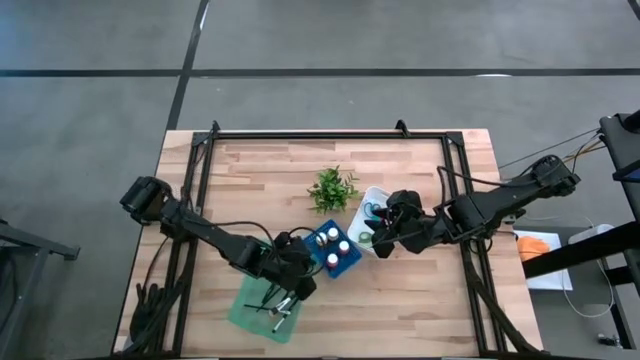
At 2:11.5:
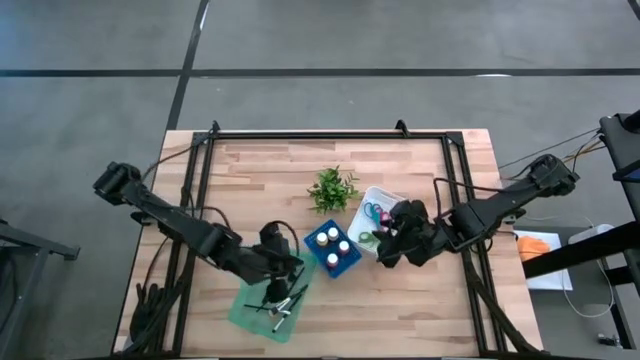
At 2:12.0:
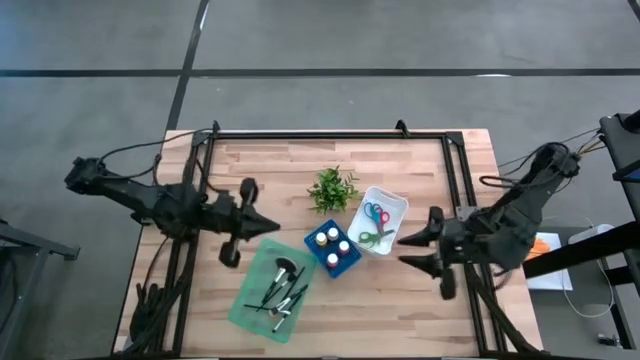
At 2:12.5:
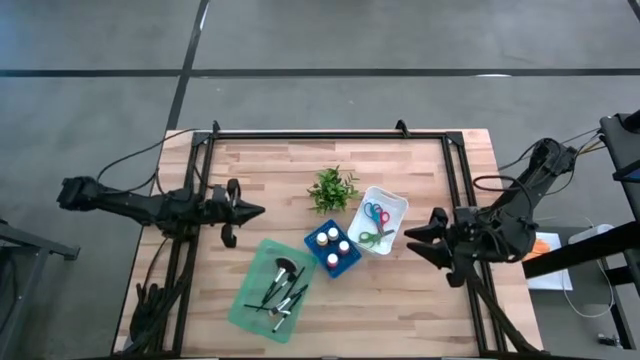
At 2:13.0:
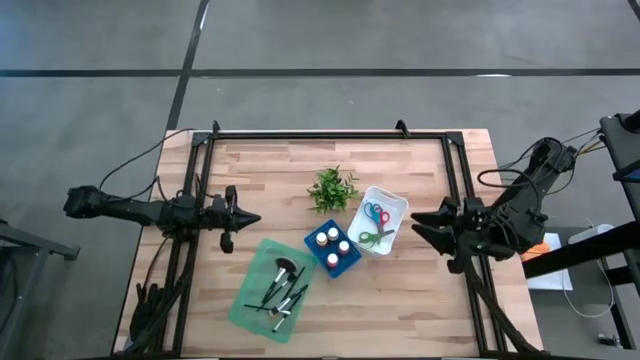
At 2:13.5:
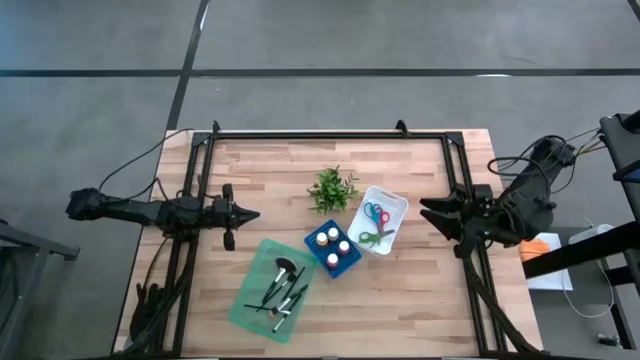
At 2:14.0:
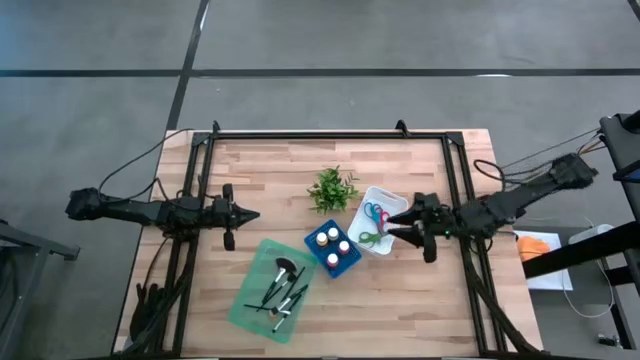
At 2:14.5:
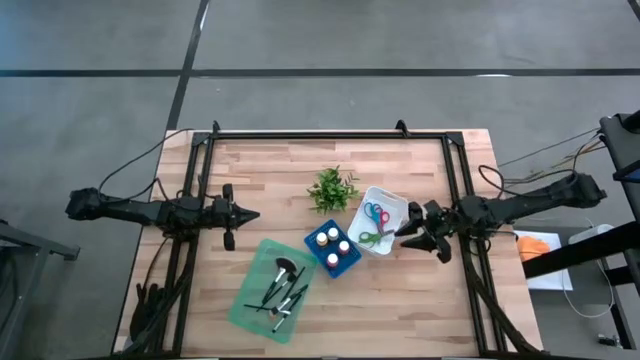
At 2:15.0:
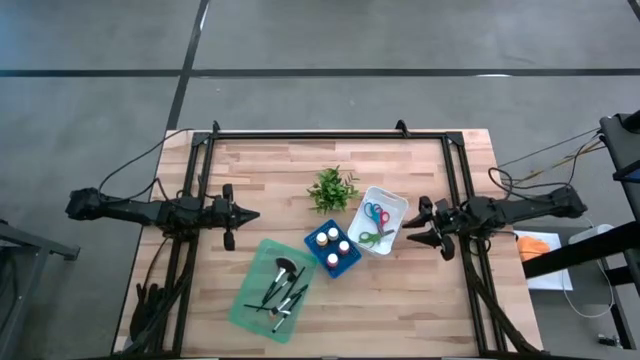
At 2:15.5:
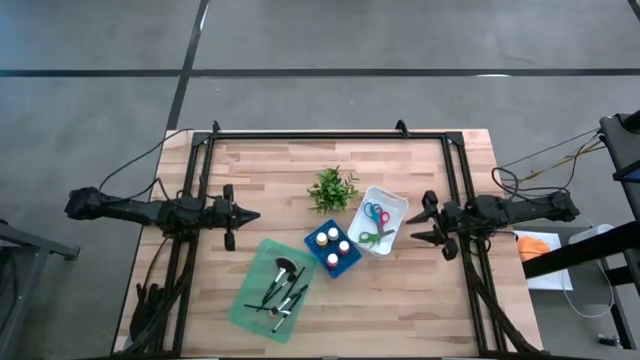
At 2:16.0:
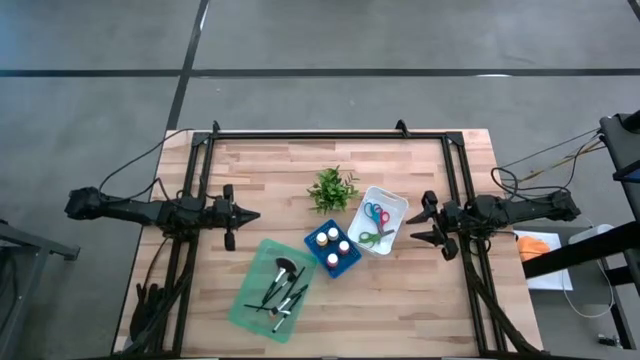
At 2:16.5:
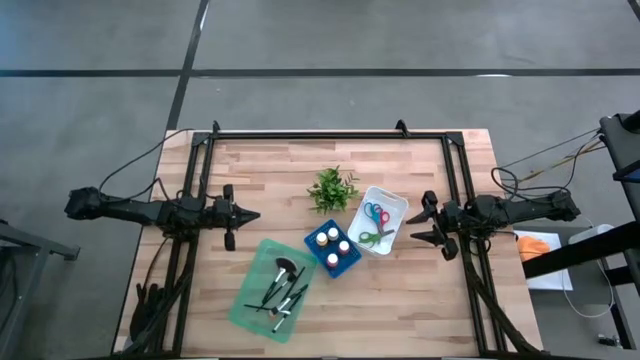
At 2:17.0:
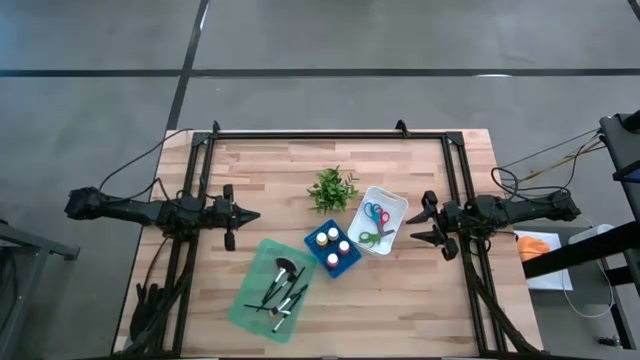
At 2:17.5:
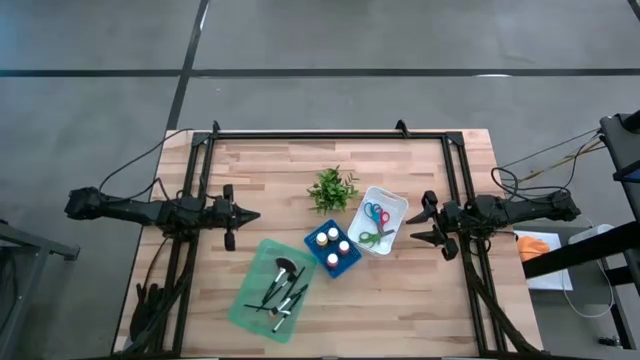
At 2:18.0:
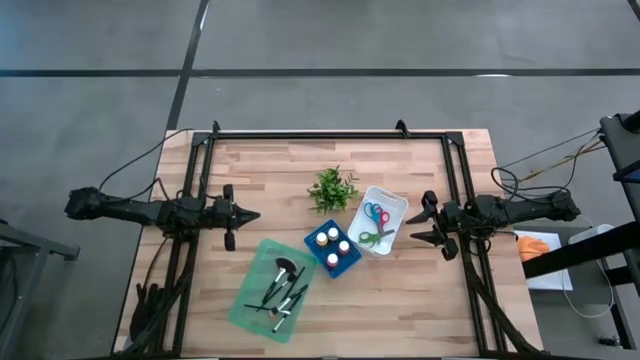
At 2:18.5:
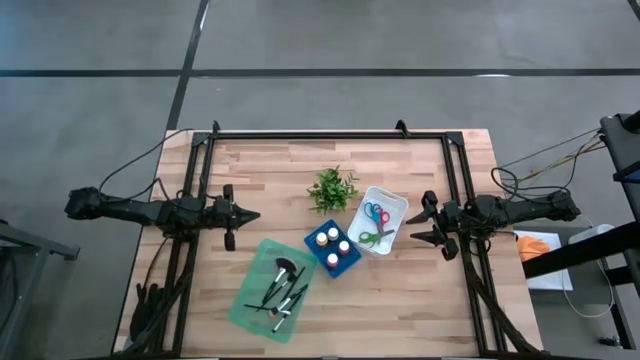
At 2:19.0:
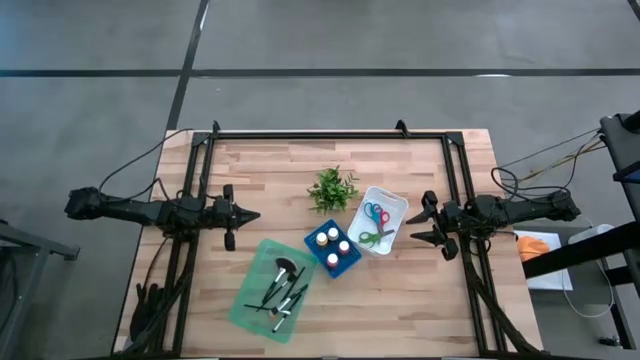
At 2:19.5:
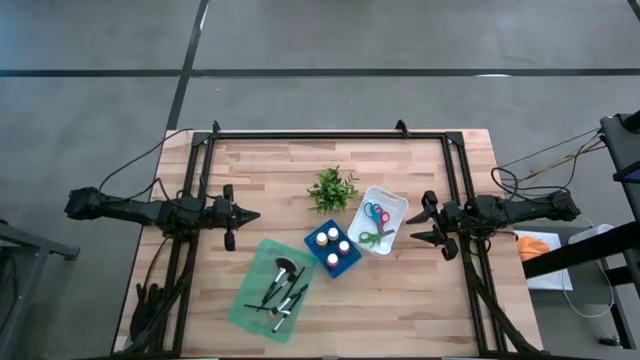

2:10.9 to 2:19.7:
Task: Pick & Place Paint Supplies
Return to Home Position

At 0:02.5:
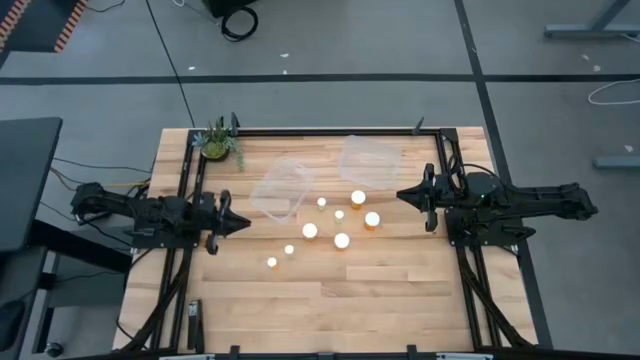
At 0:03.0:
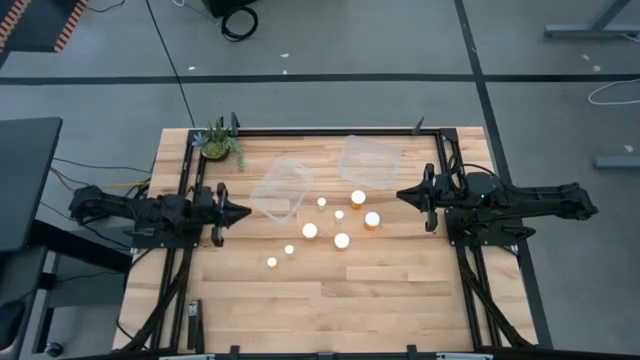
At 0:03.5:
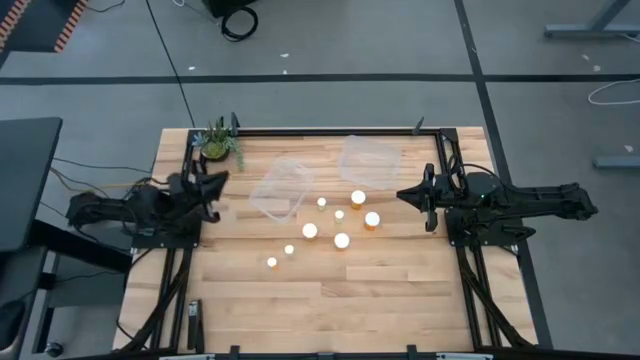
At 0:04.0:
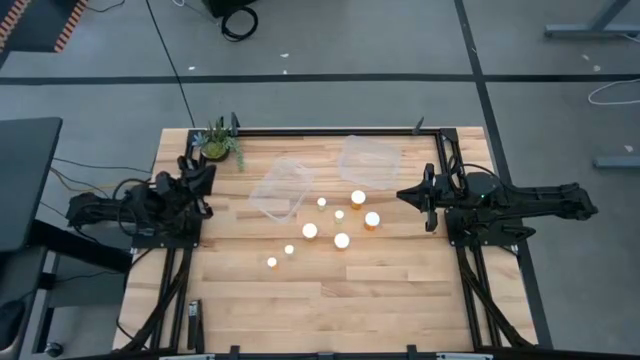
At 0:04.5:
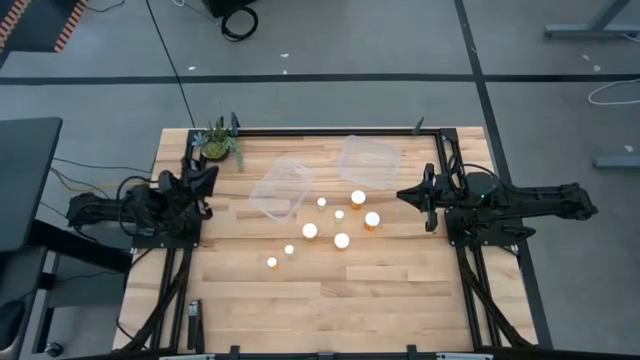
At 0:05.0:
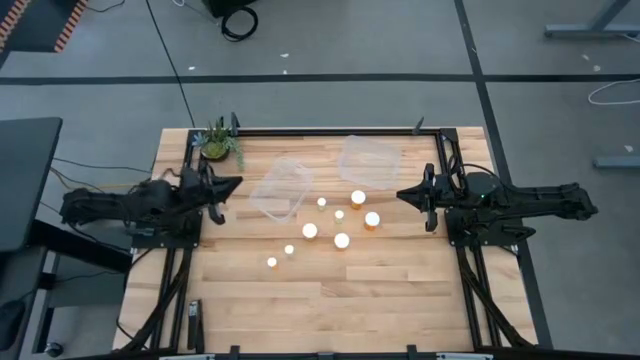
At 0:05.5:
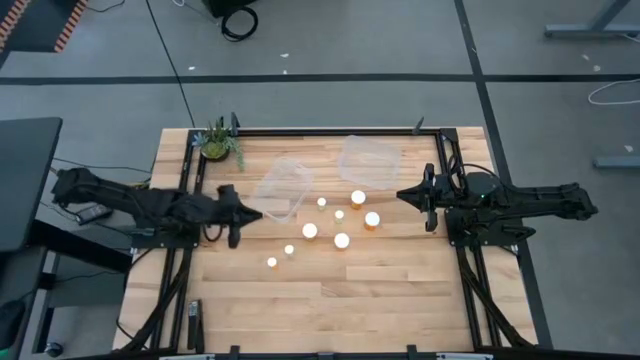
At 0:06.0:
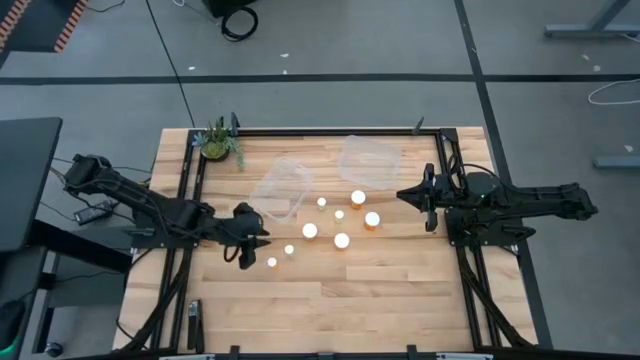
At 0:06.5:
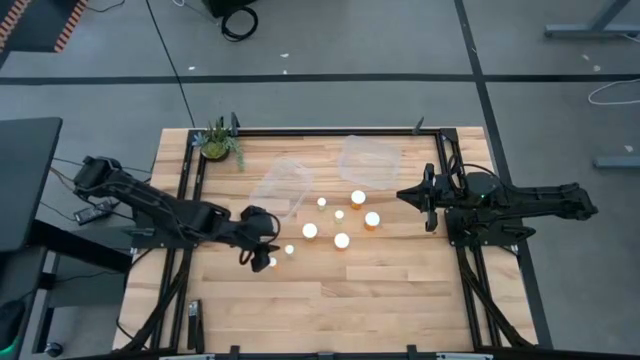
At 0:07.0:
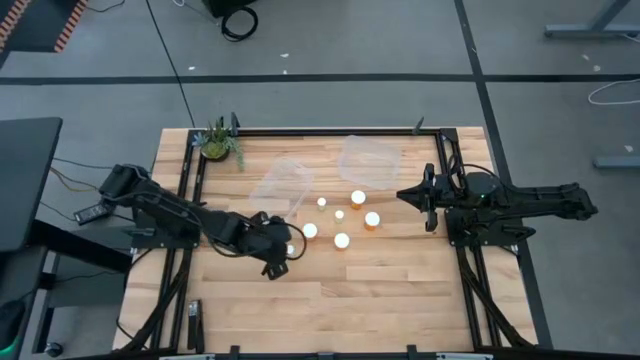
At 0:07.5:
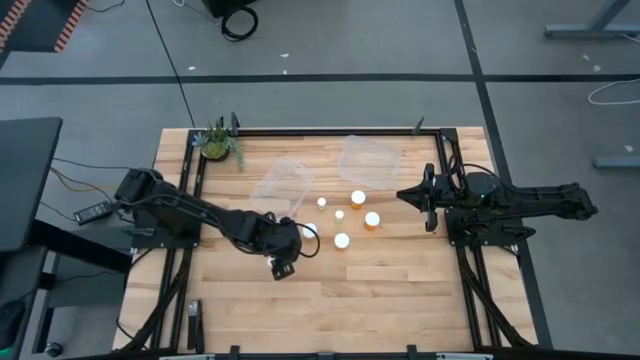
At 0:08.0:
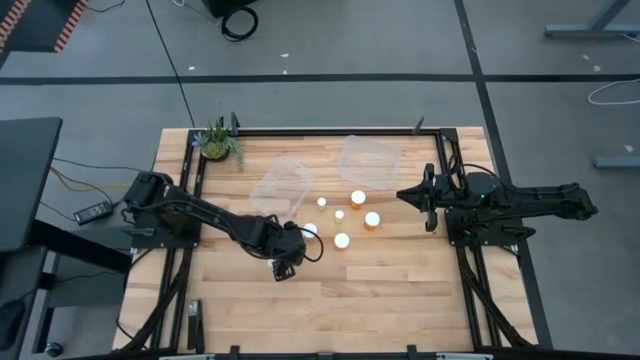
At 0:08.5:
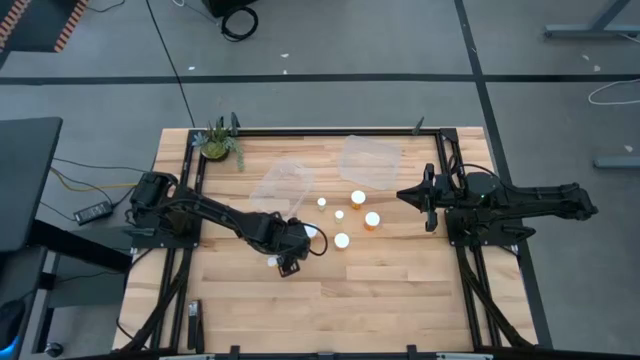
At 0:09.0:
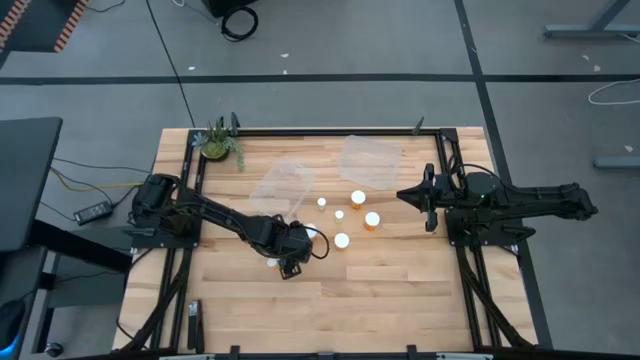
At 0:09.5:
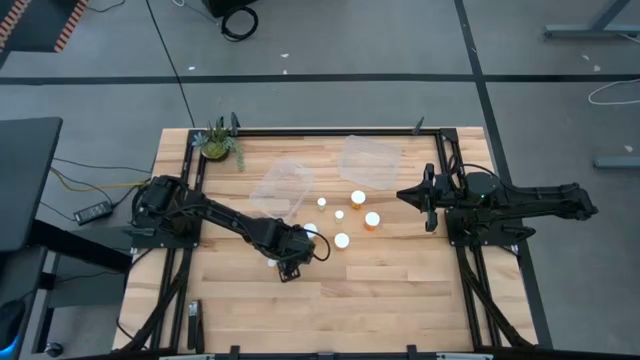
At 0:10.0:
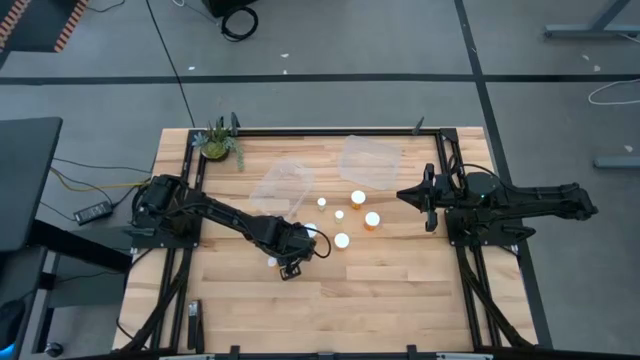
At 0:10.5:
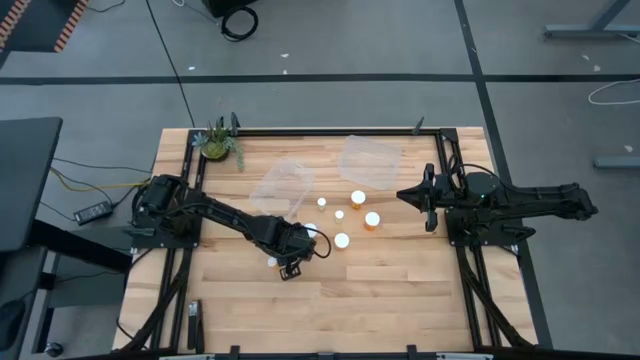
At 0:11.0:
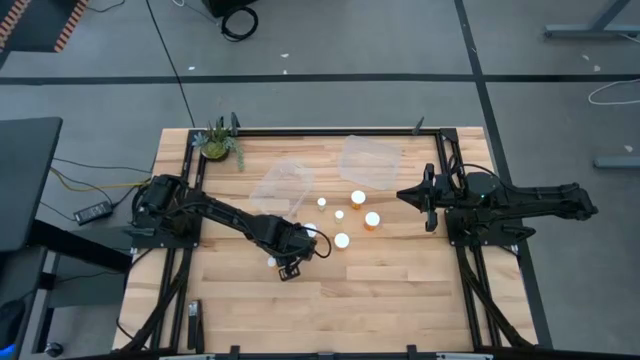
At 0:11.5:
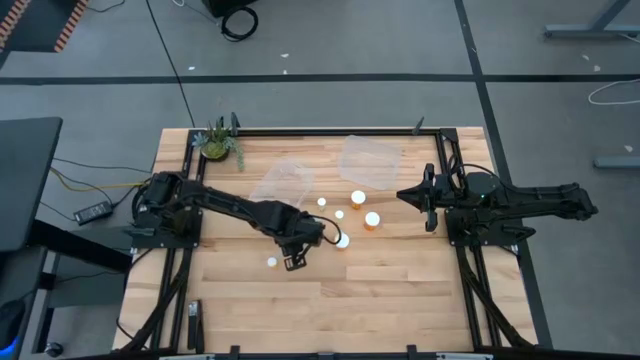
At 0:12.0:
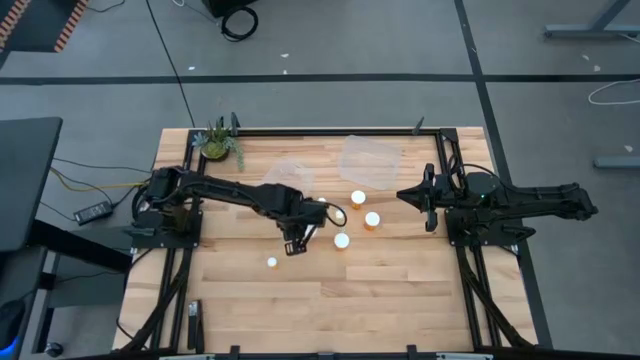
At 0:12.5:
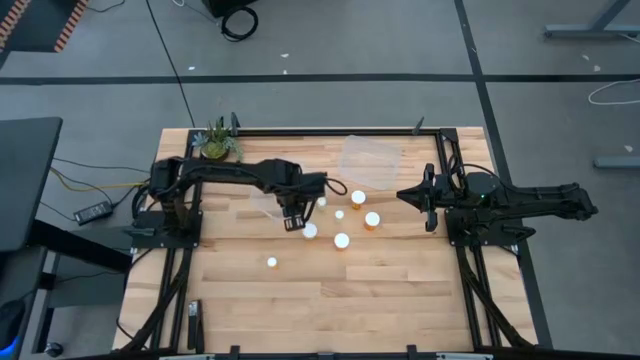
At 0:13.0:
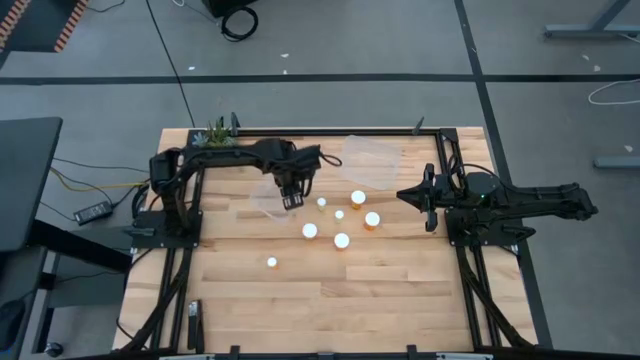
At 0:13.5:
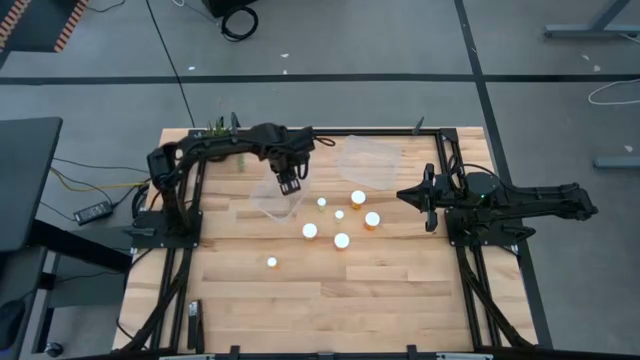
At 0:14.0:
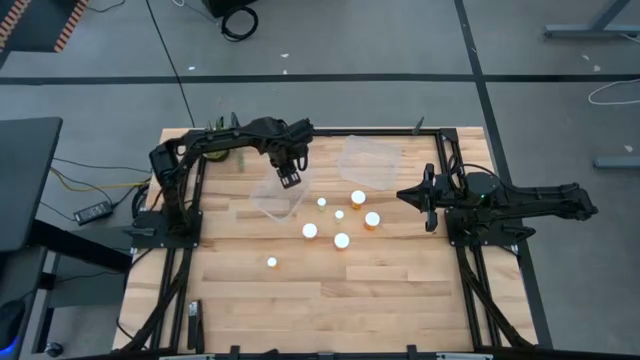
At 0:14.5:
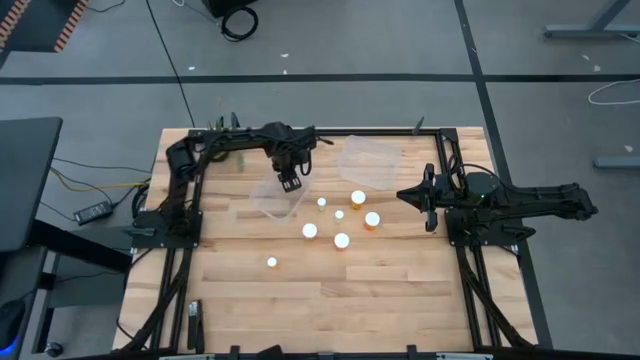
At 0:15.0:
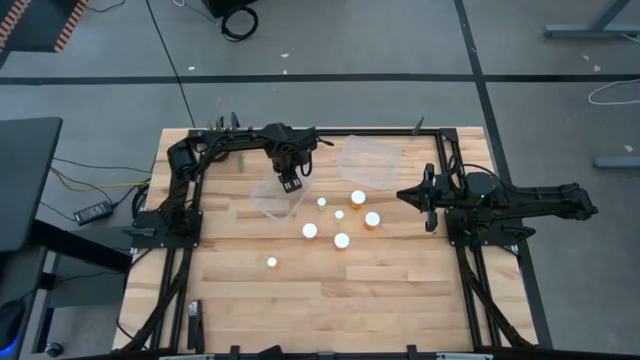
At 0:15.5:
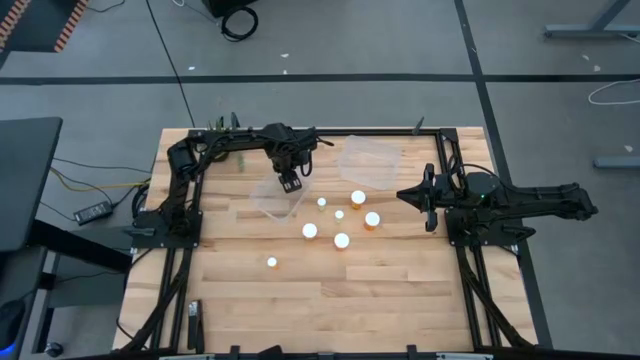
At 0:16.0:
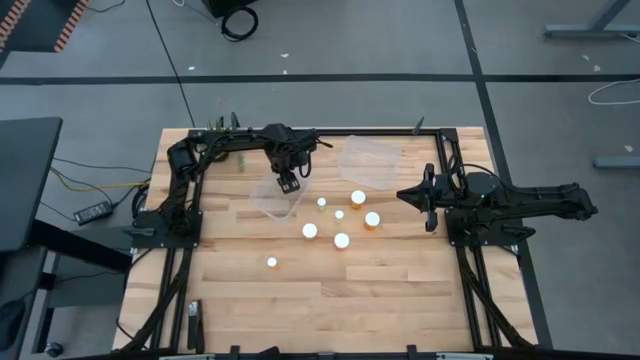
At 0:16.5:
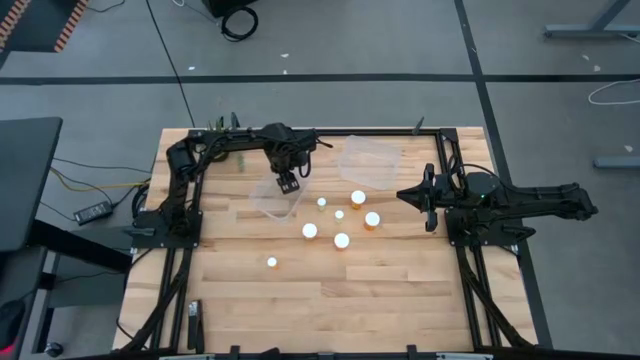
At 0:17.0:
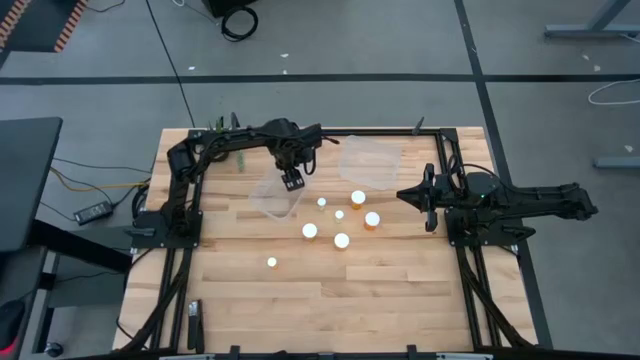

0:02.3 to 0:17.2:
Task: Pick and place medicine bottles into bin by pill shape (circle, oval)
Put the small yellow pill bottle into the left transparent bin
